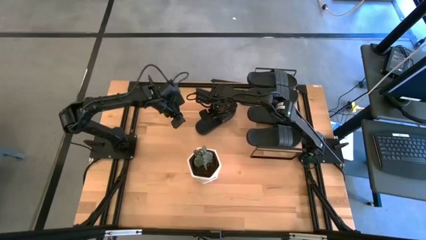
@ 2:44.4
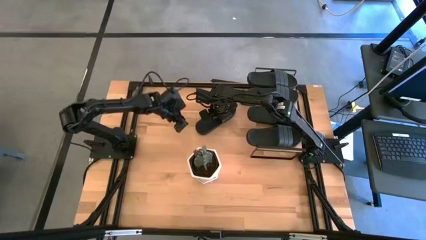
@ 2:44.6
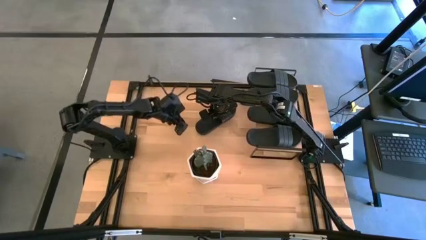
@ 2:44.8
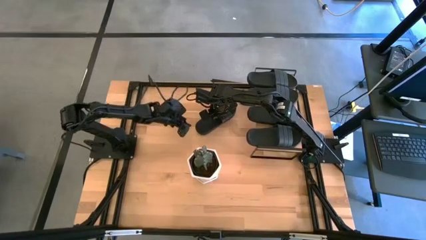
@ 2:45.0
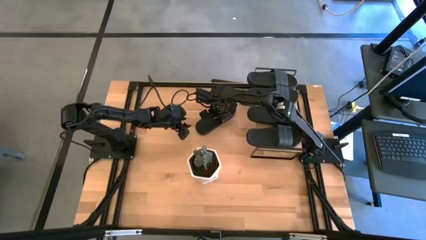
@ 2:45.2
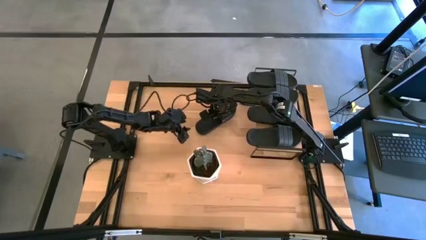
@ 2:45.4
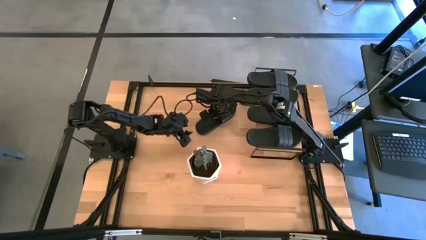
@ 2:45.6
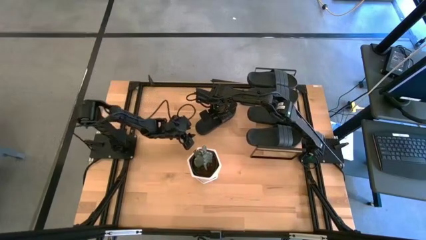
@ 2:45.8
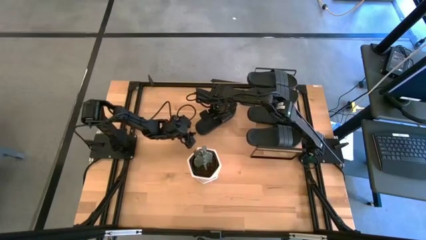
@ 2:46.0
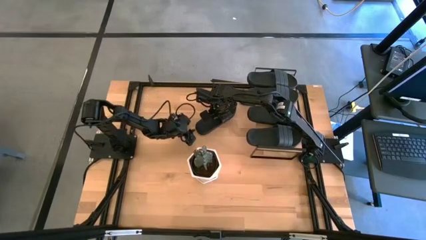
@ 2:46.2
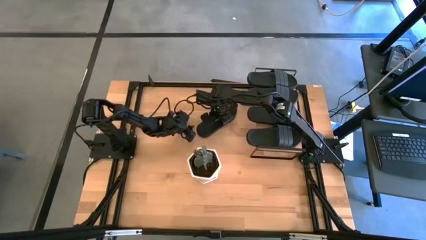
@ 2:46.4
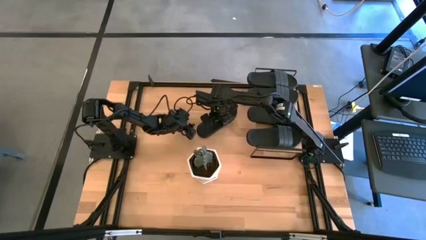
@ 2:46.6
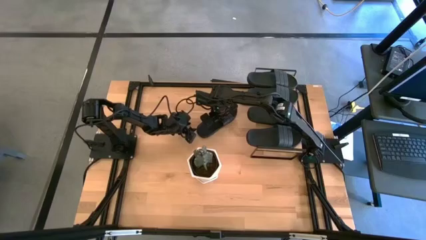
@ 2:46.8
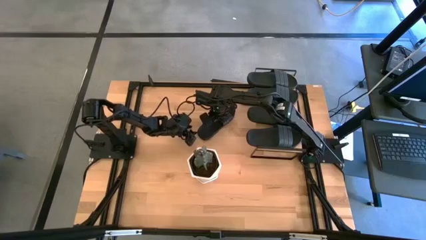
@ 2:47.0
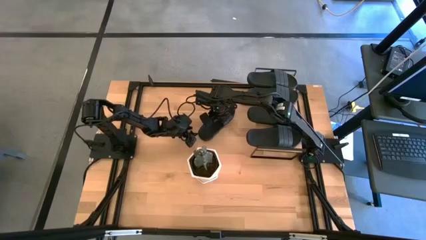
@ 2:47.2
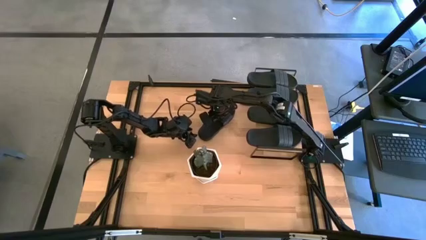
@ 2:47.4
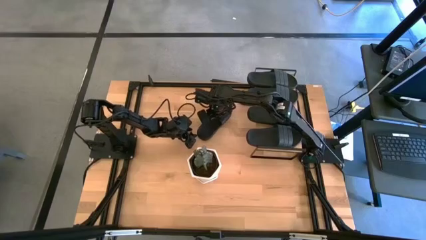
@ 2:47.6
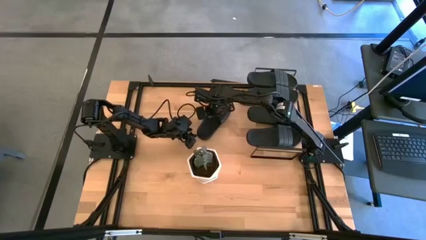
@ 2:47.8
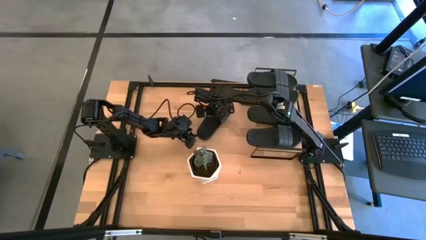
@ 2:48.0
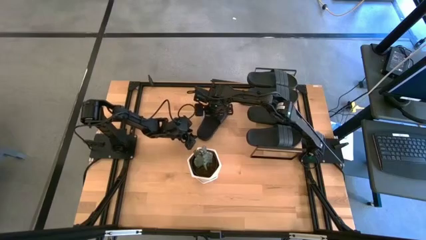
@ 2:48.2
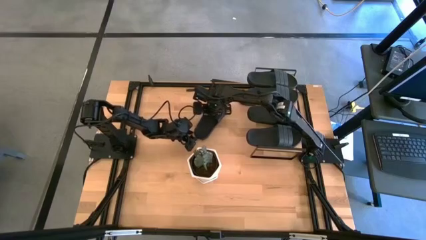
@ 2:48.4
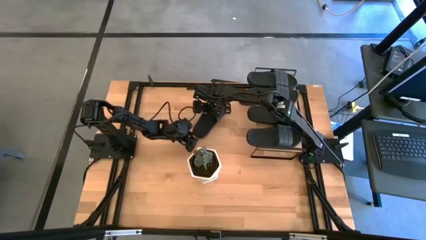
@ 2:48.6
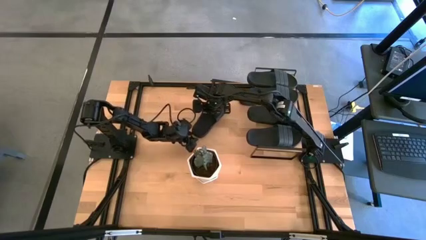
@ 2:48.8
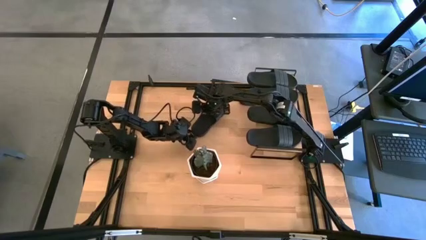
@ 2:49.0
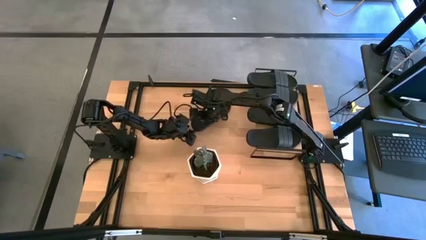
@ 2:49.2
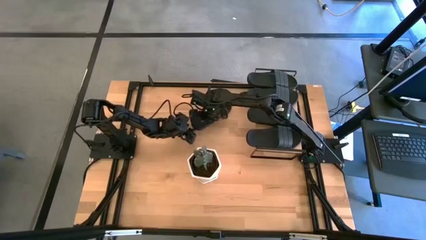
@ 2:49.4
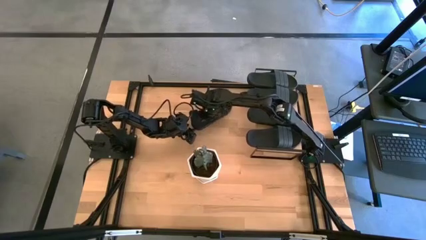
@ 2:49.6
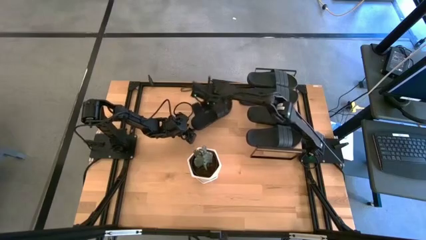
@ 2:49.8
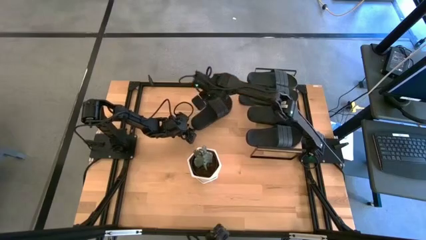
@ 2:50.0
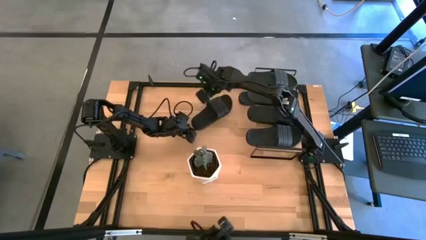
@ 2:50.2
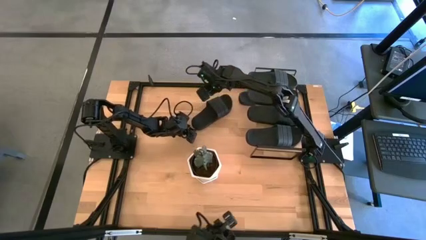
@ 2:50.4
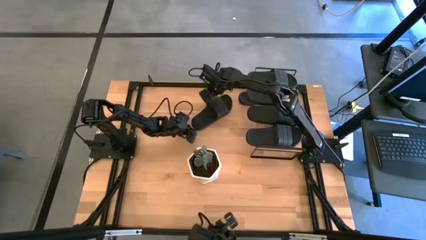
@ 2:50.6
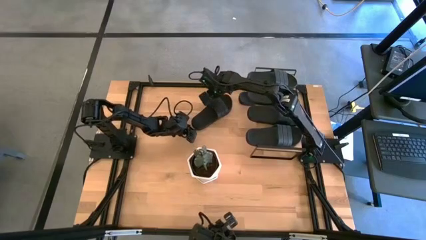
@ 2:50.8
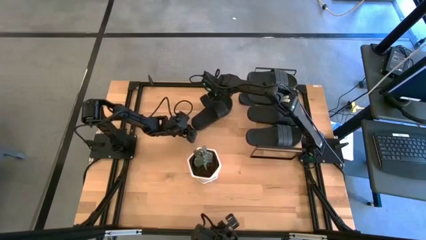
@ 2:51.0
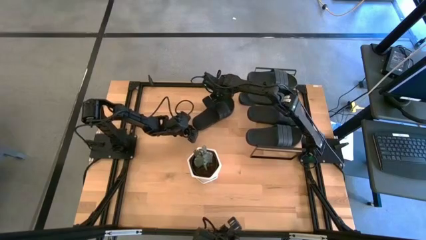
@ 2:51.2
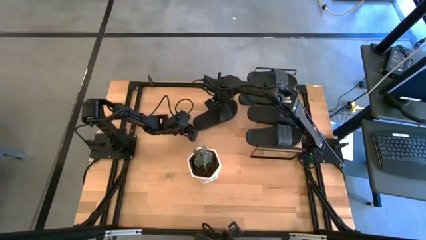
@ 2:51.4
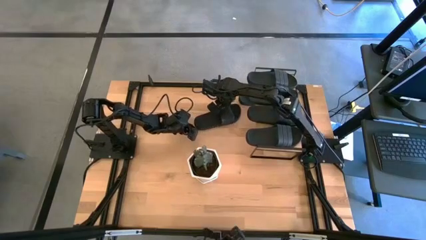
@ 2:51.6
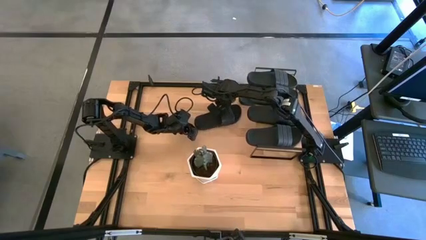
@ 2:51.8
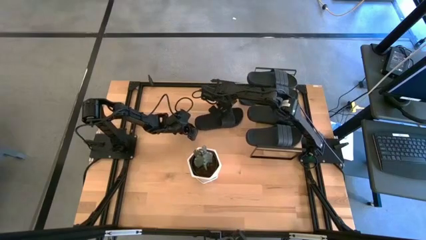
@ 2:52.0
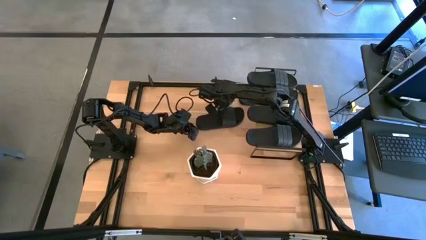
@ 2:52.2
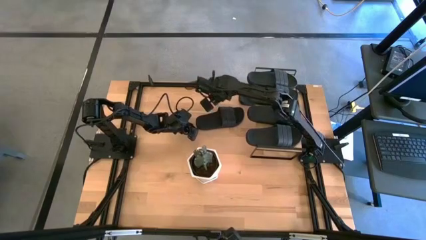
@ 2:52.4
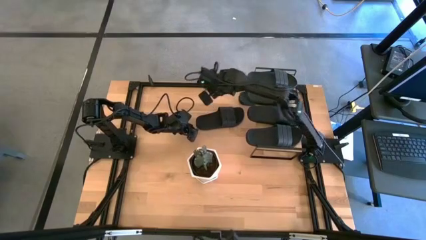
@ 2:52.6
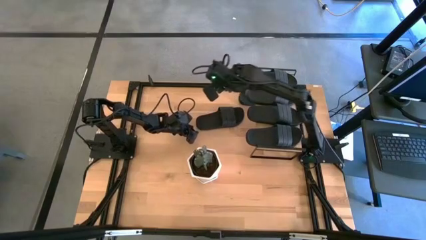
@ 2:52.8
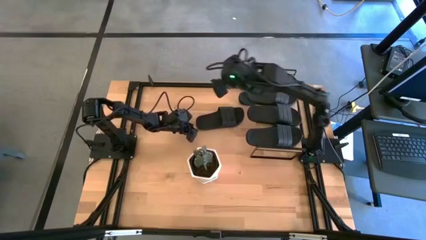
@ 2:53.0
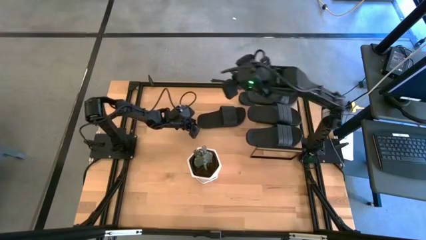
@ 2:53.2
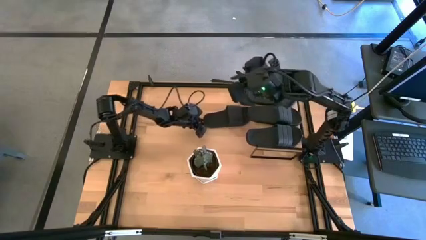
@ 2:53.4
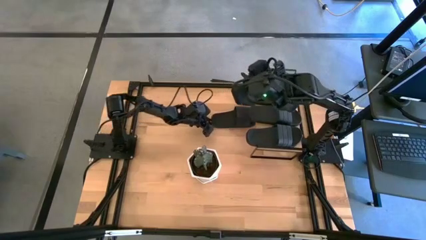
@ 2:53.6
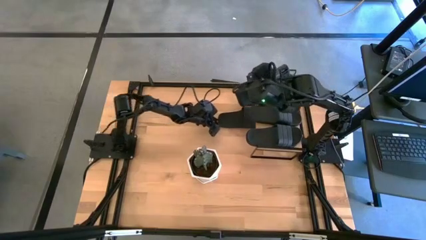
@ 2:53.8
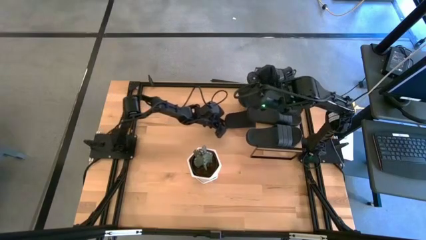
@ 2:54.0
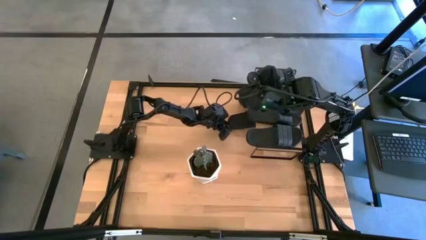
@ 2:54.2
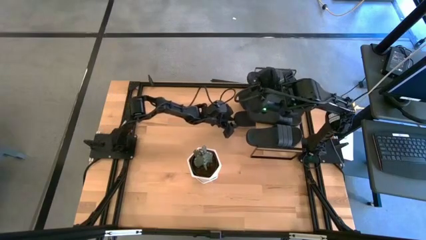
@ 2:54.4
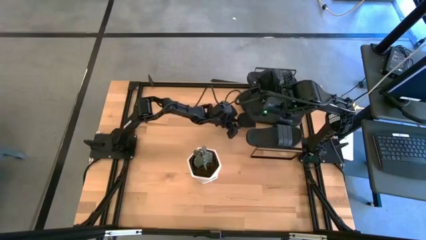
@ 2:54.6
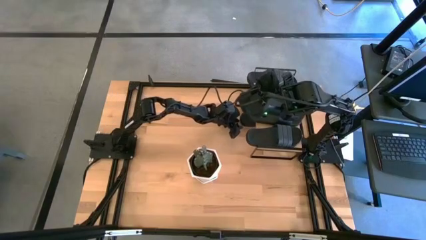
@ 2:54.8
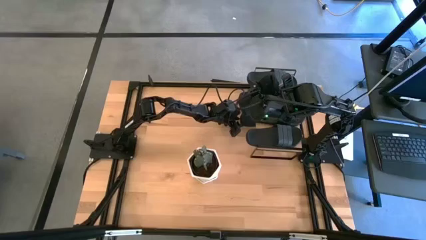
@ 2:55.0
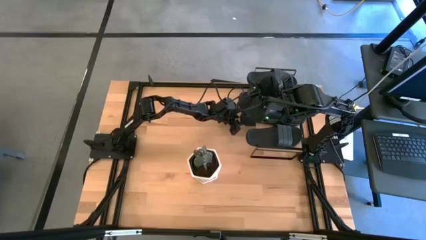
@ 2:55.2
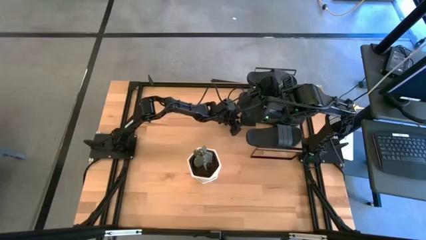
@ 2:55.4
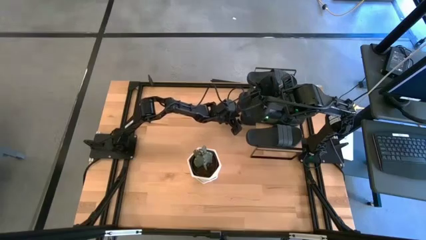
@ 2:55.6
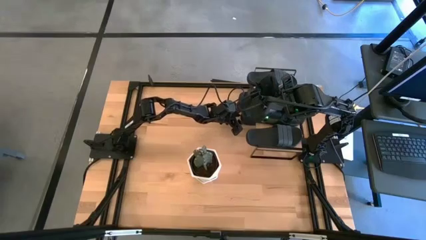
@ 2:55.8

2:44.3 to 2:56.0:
Task: Pick and place slides into the shelf
Put the black slide under the shelf
